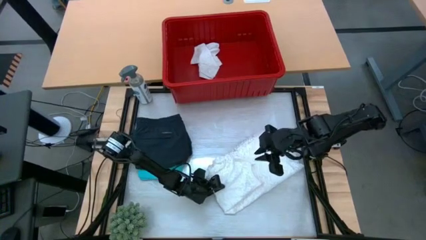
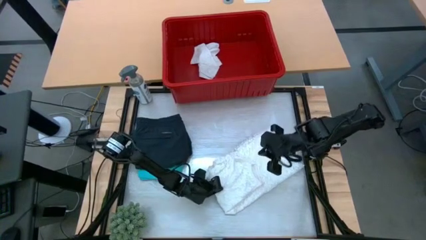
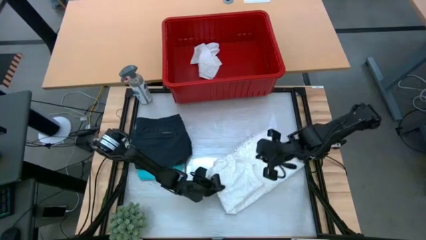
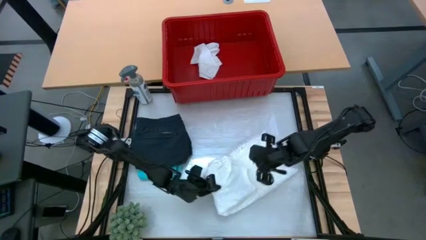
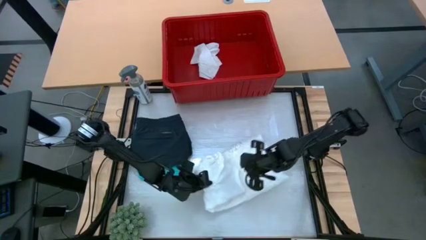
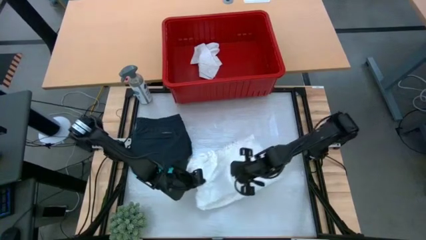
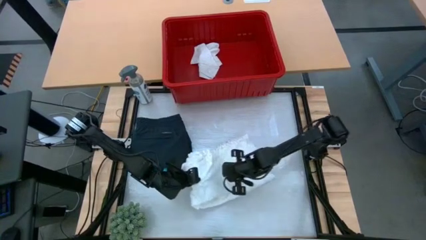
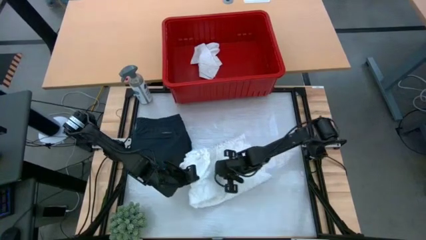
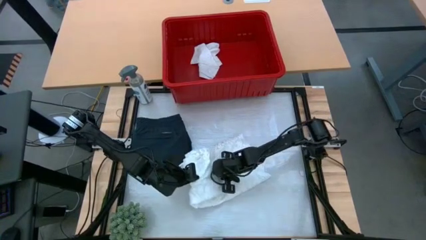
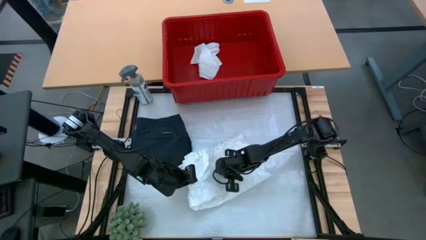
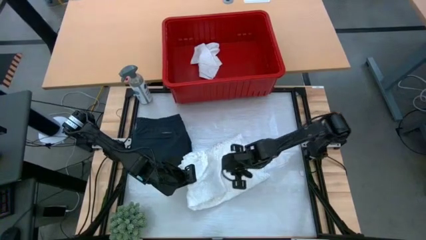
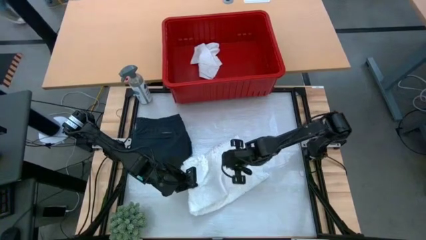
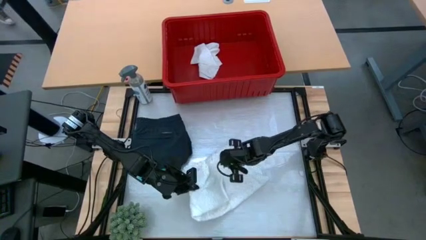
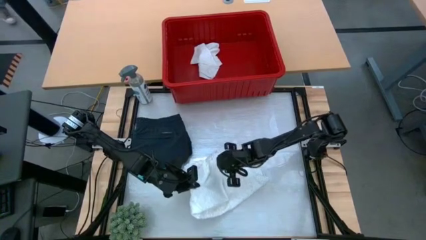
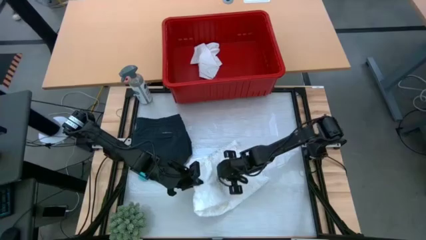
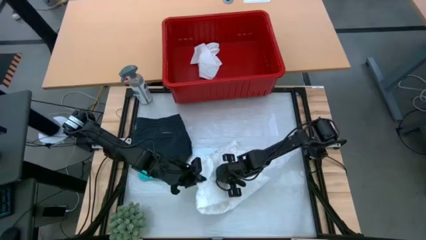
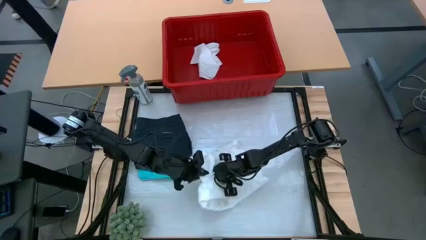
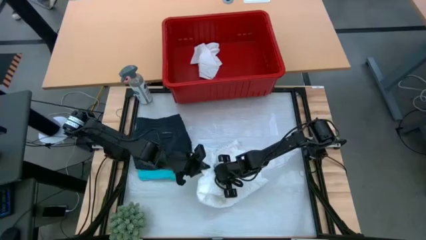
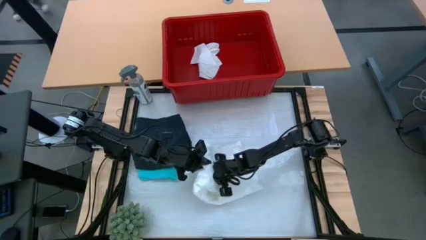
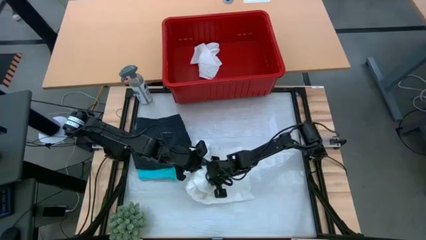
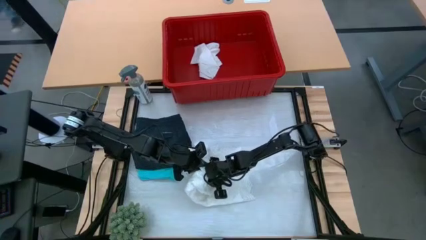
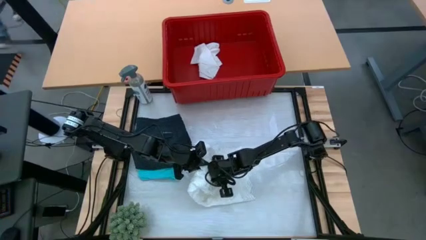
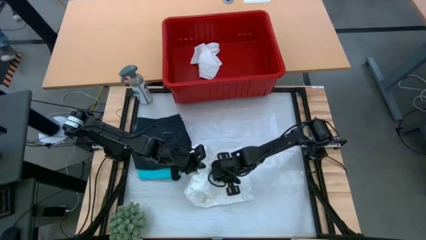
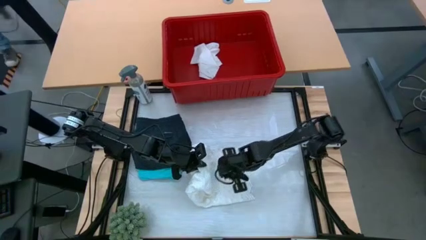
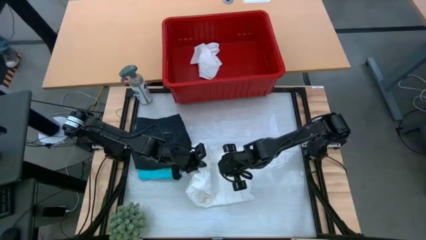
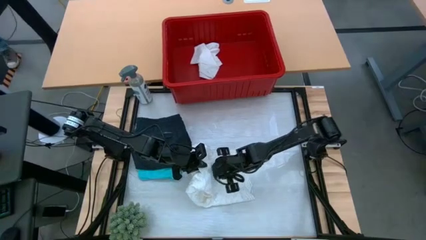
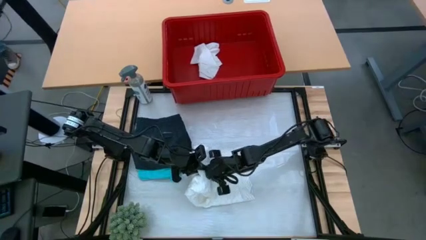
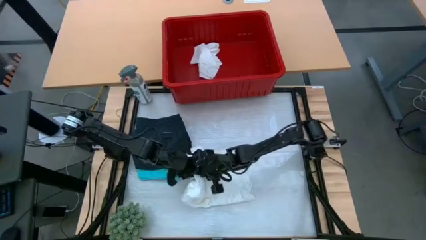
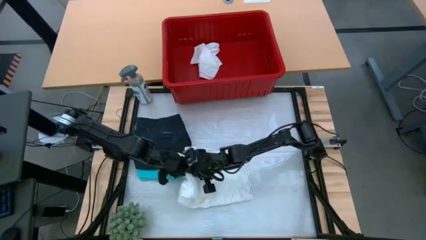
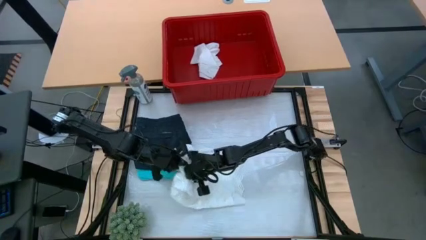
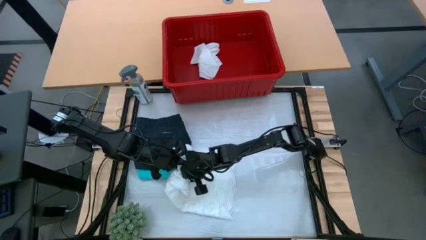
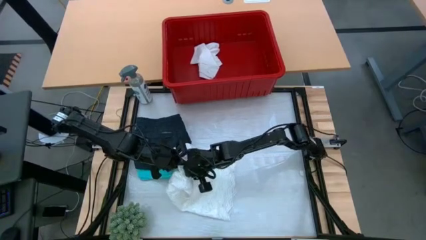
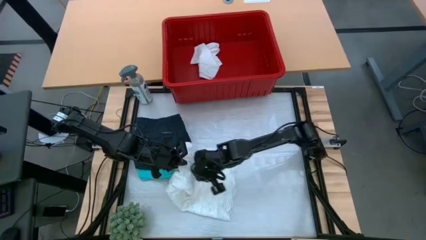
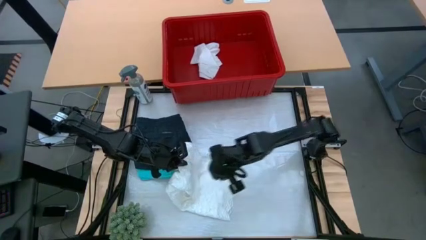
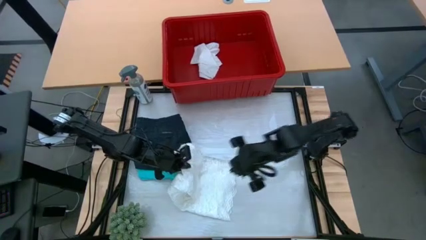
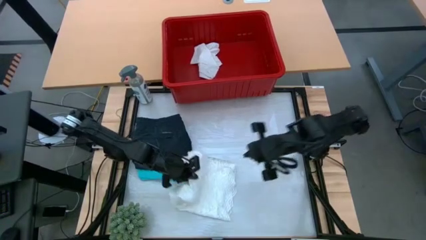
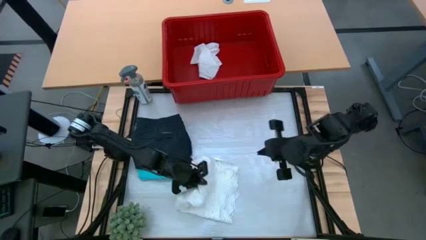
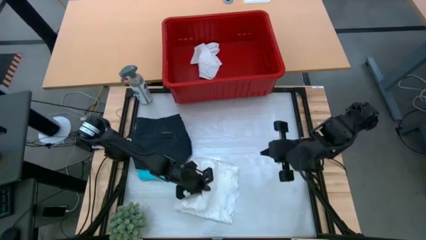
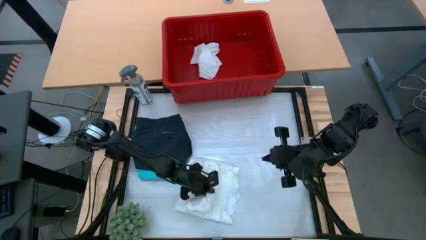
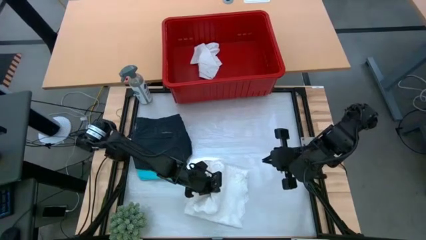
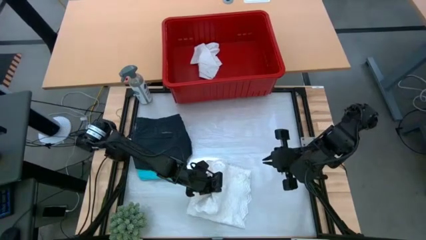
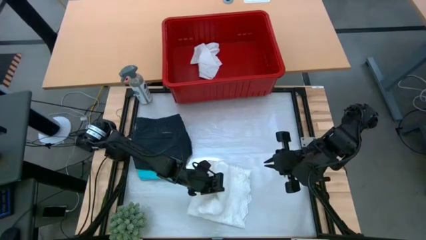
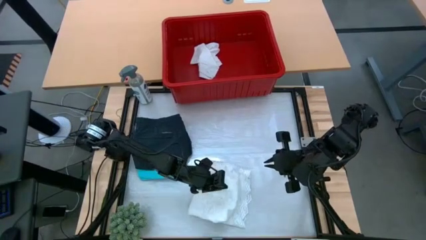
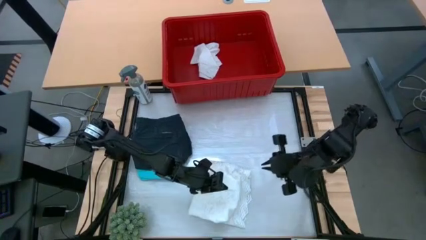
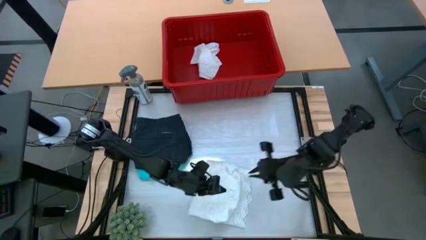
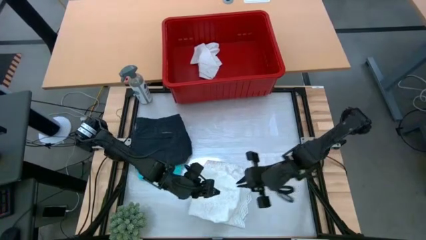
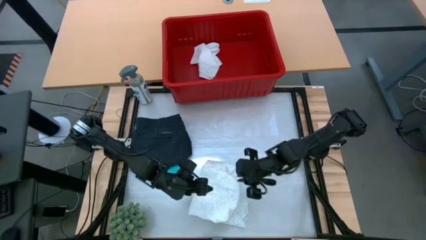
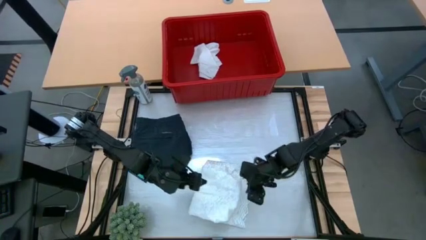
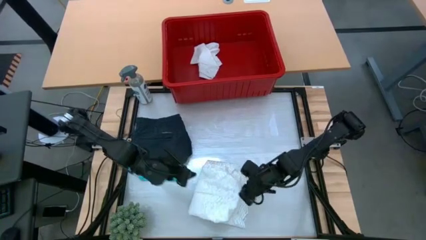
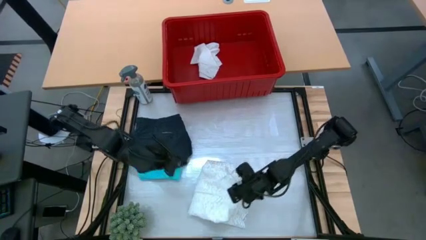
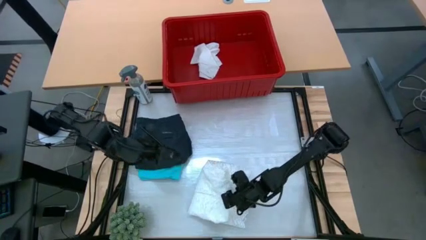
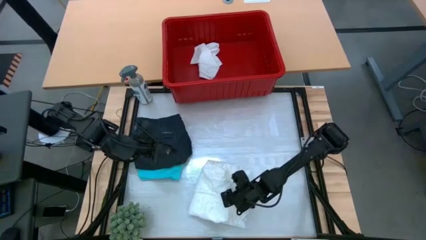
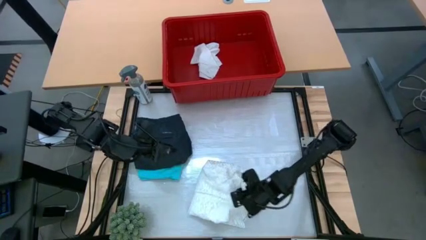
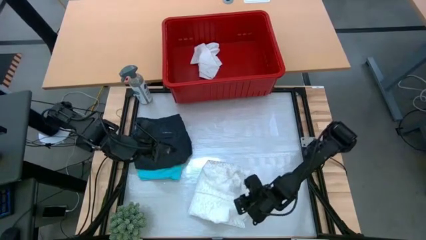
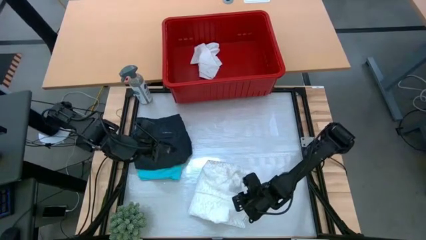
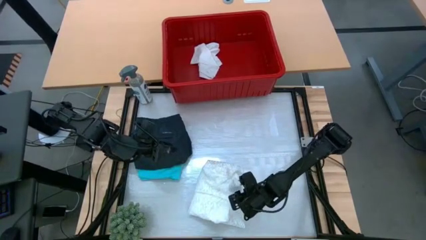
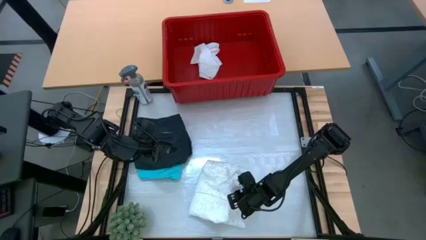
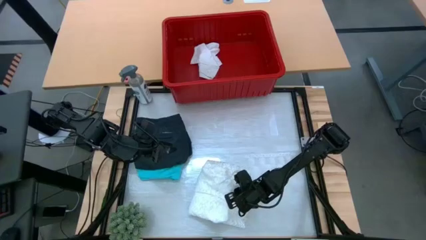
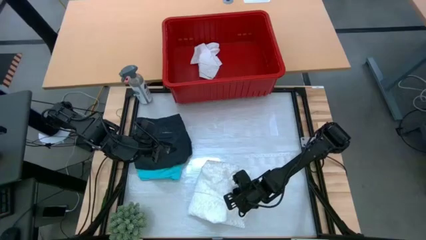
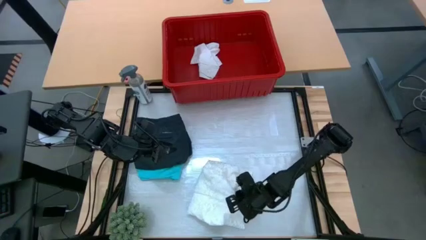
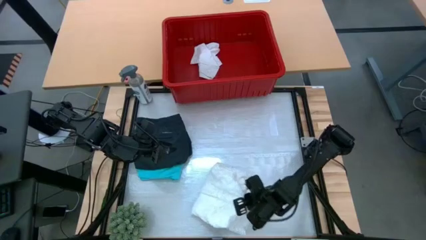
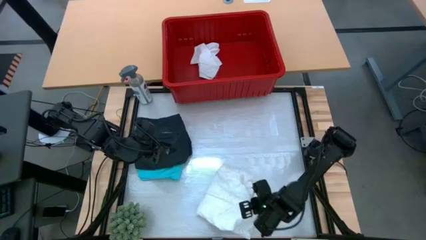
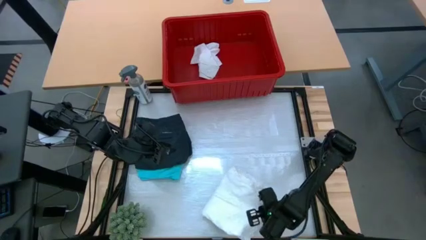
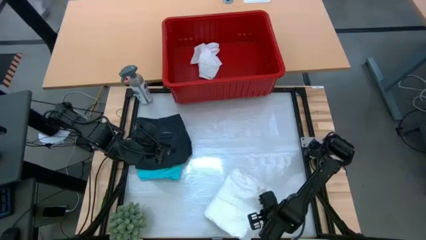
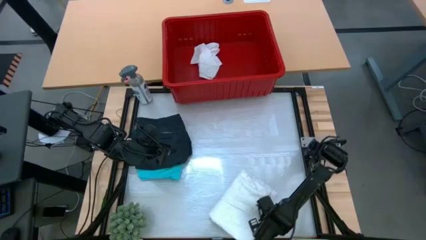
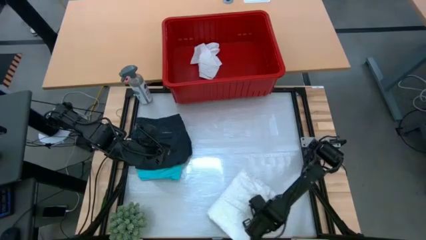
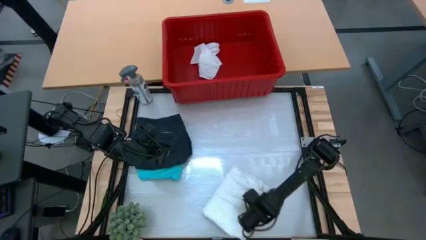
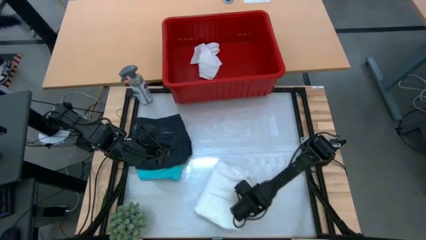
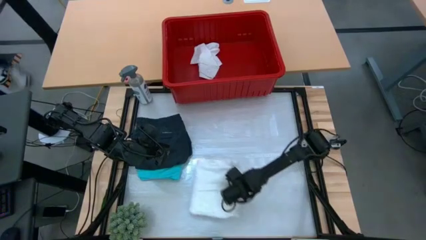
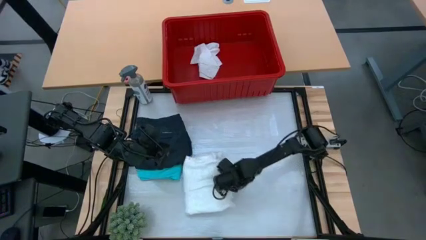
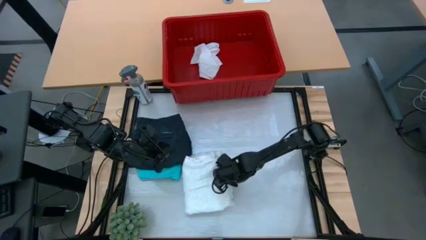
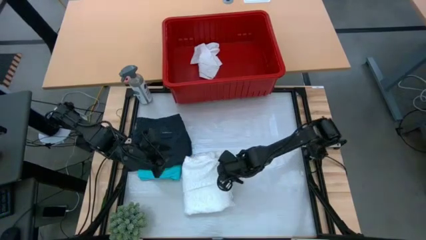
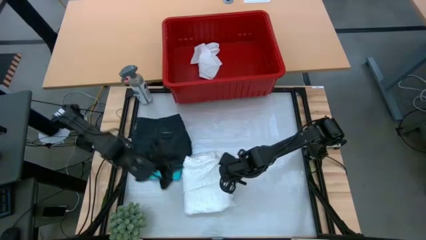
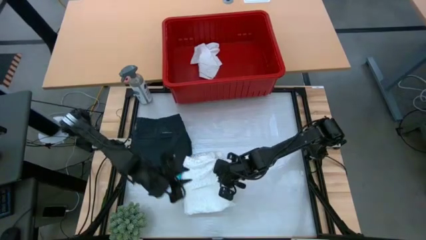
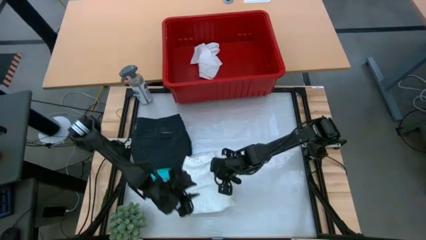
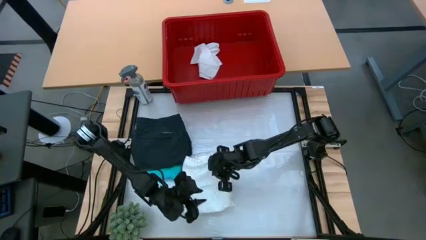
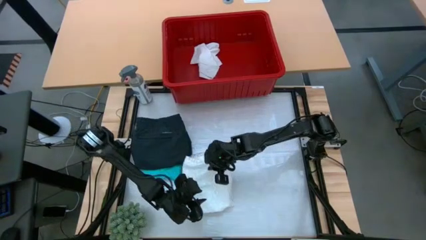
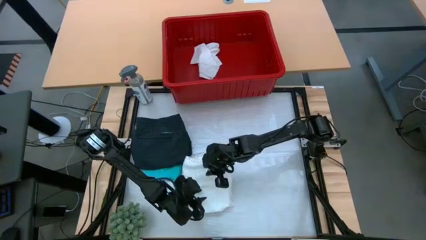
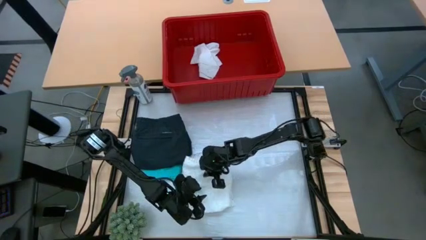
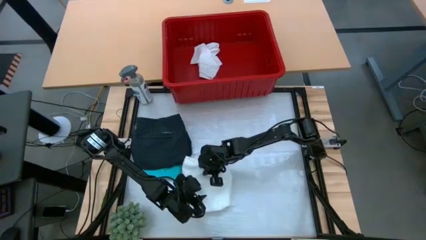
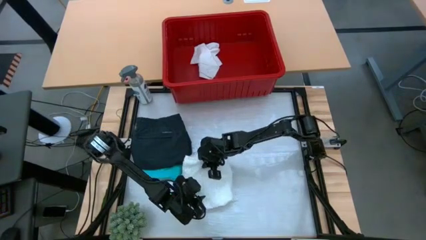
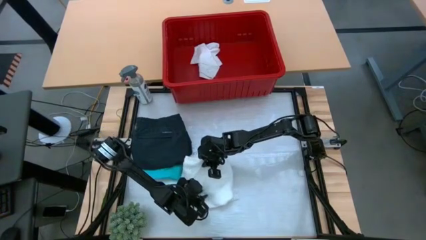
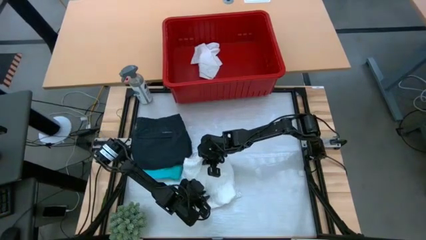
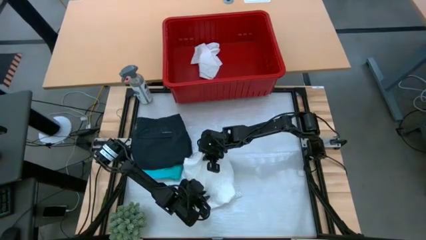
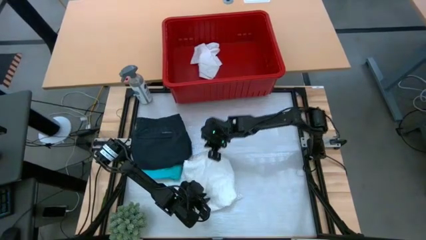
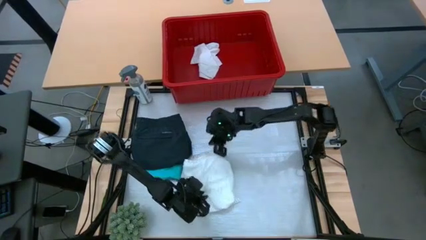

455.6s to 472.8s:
Task: Fold laundry
Fold the white dress
